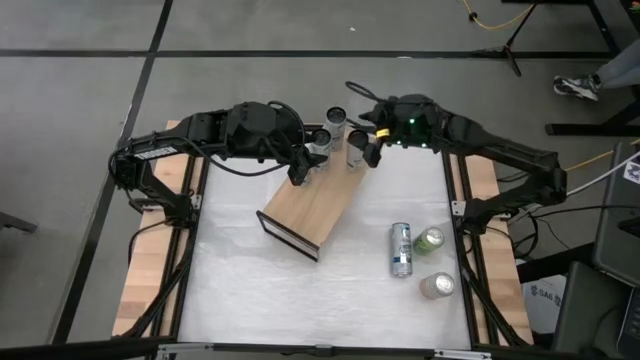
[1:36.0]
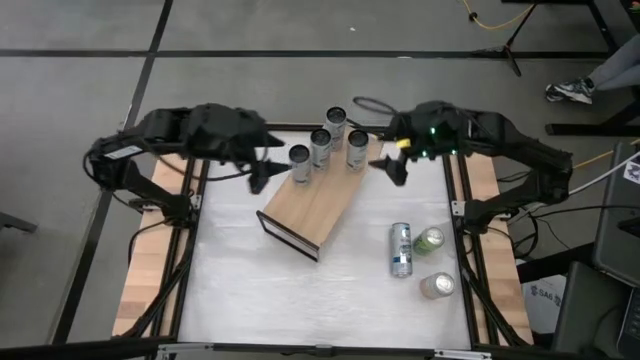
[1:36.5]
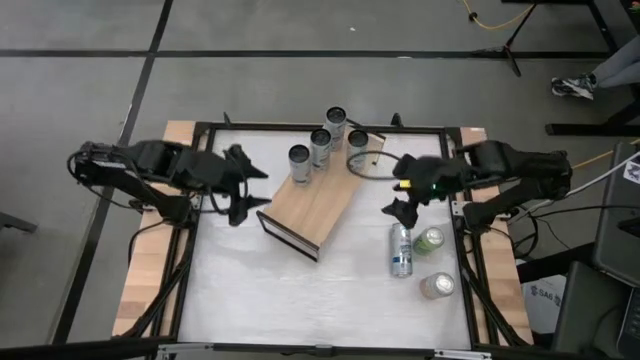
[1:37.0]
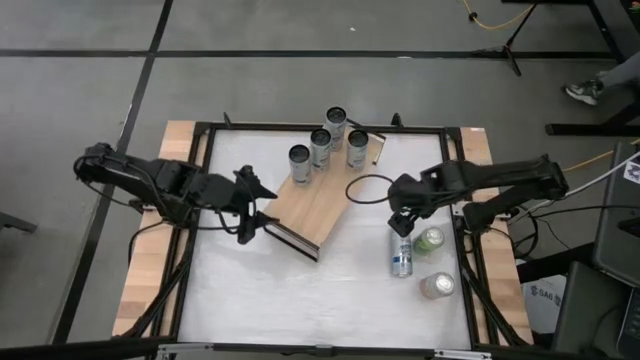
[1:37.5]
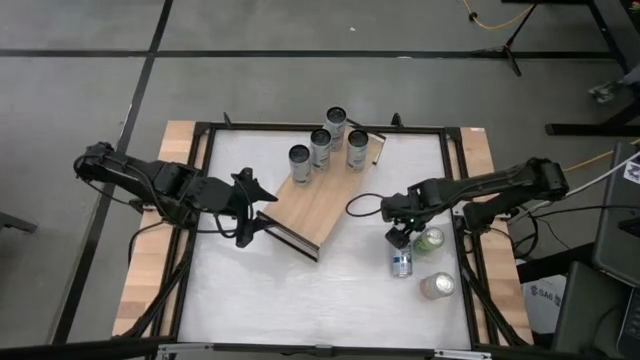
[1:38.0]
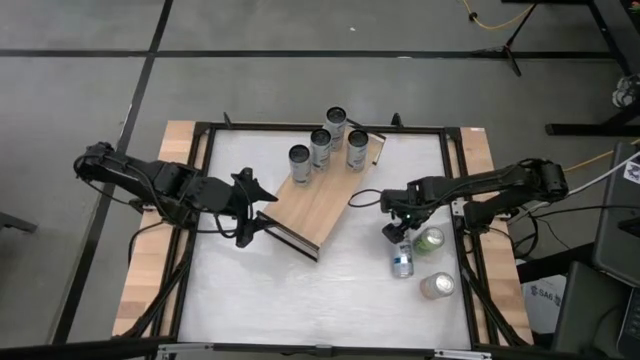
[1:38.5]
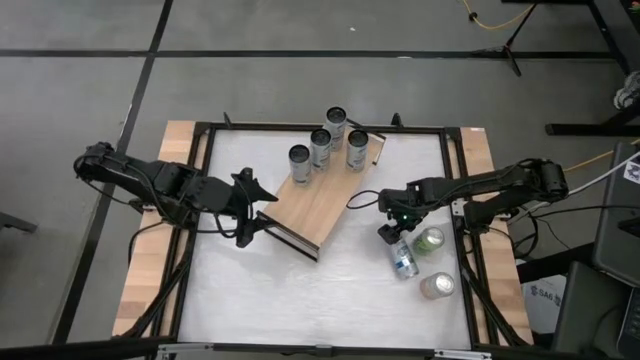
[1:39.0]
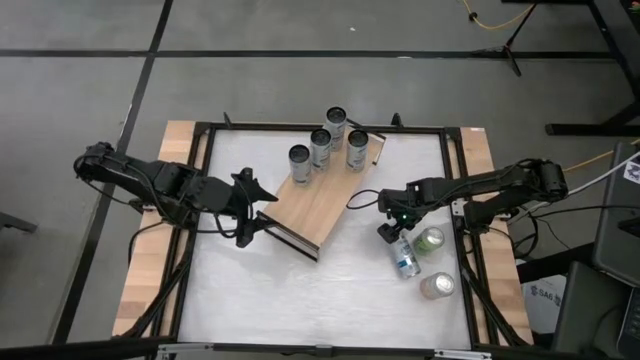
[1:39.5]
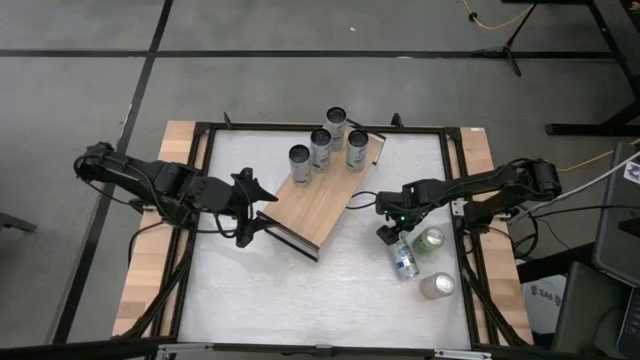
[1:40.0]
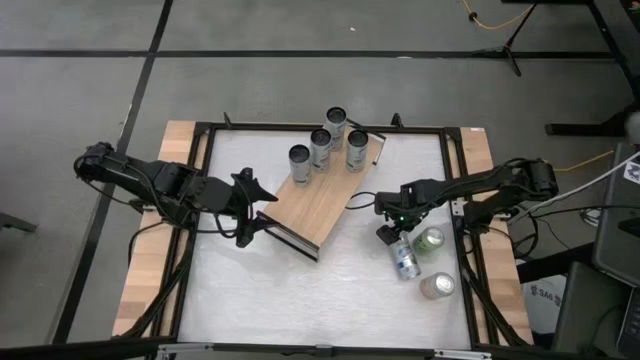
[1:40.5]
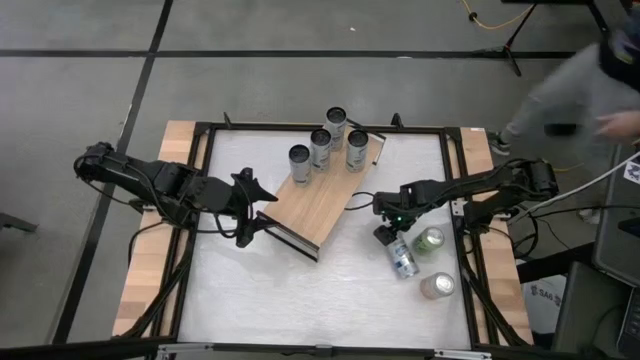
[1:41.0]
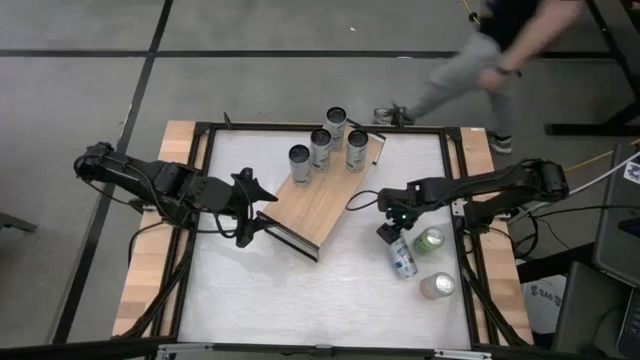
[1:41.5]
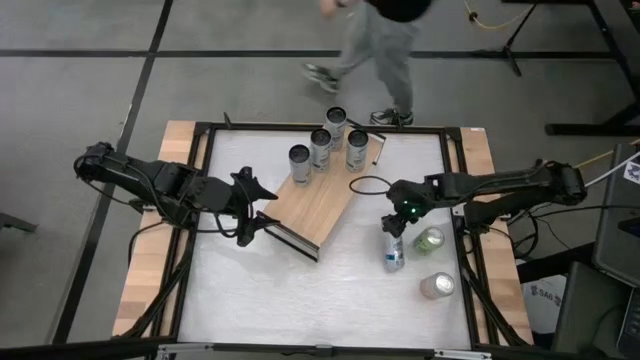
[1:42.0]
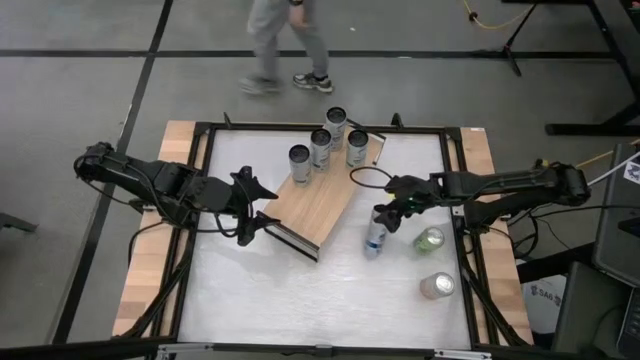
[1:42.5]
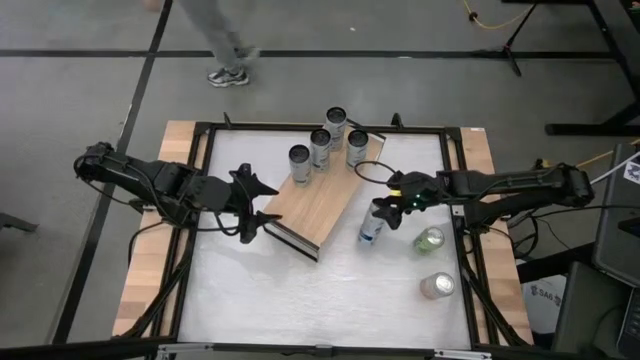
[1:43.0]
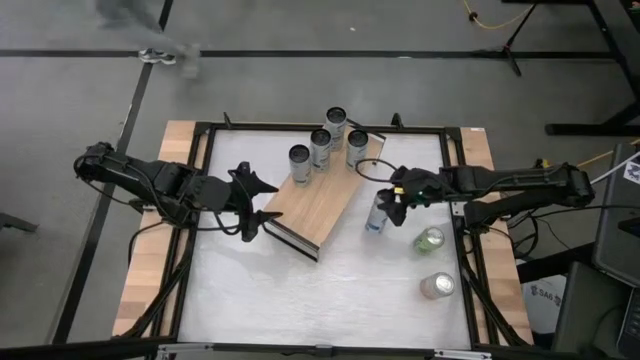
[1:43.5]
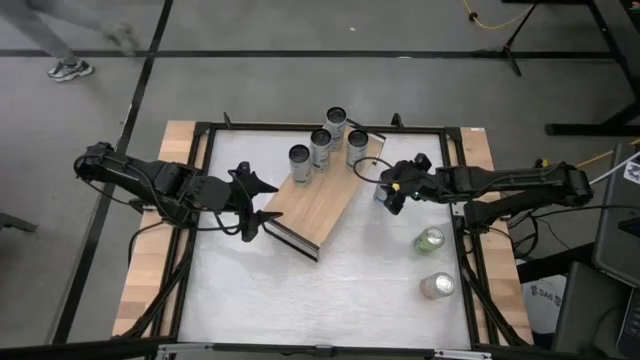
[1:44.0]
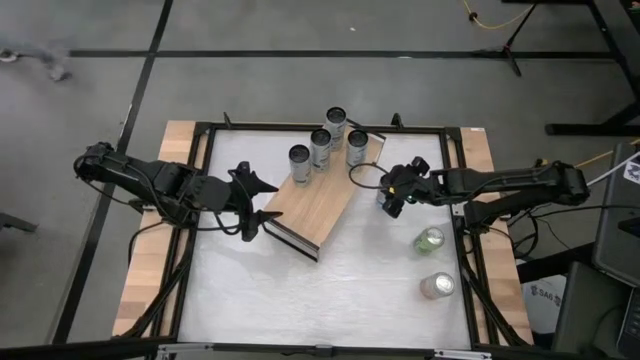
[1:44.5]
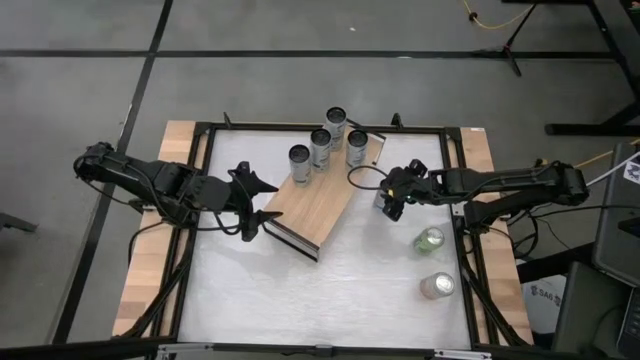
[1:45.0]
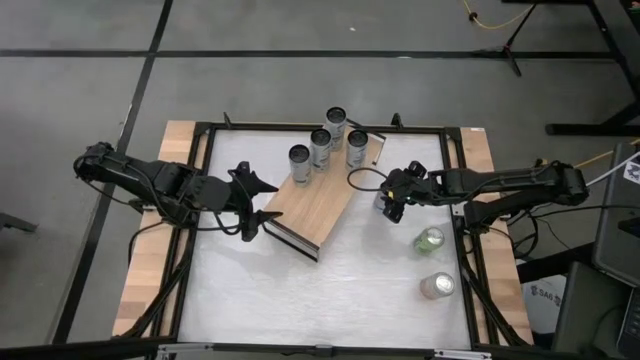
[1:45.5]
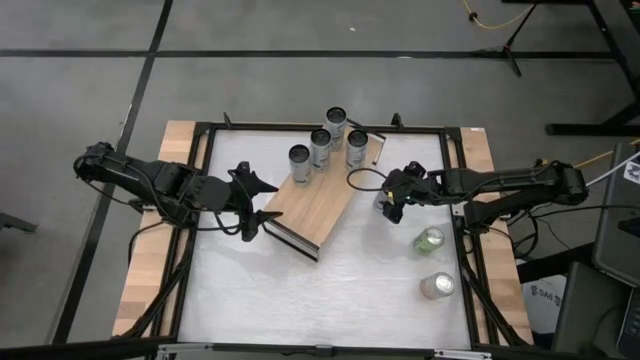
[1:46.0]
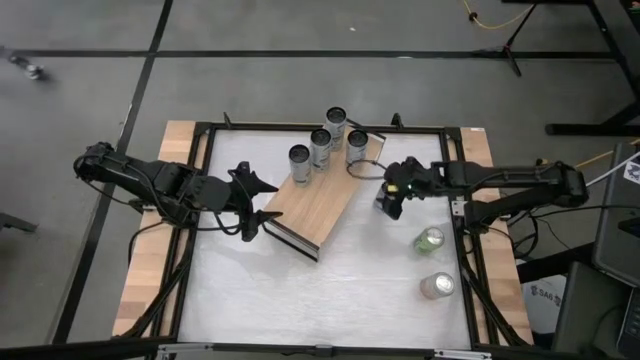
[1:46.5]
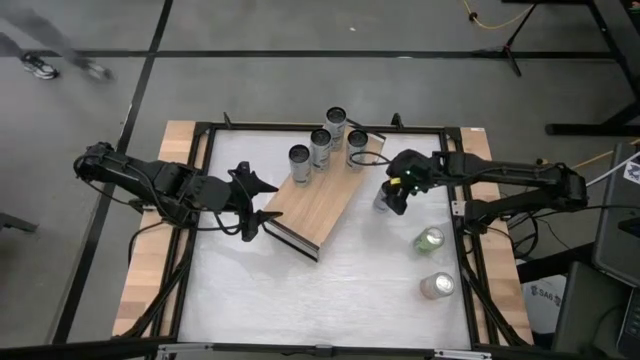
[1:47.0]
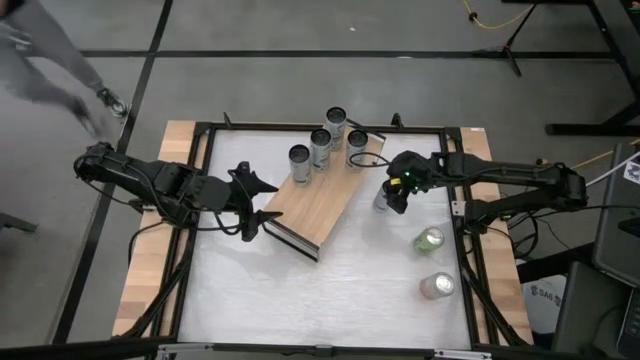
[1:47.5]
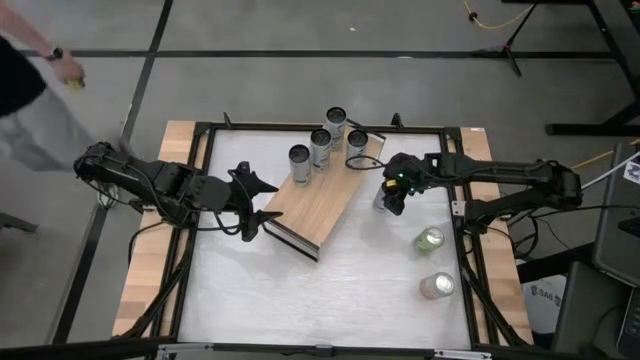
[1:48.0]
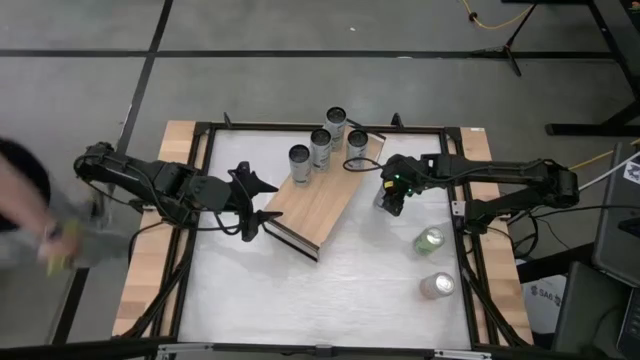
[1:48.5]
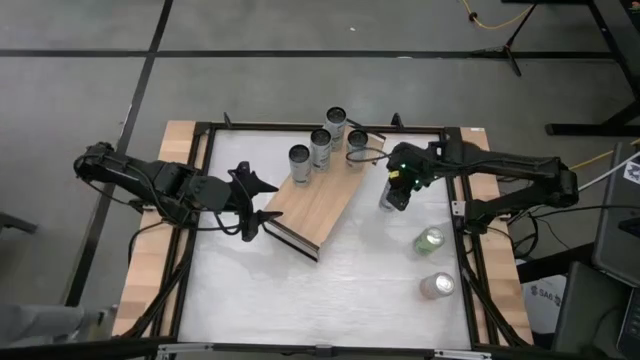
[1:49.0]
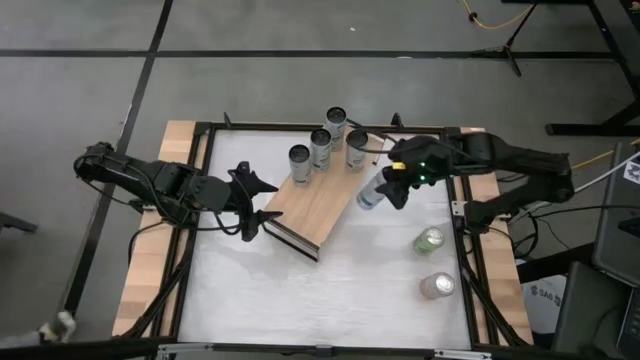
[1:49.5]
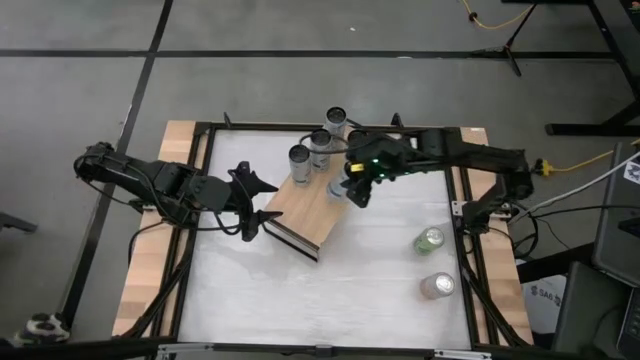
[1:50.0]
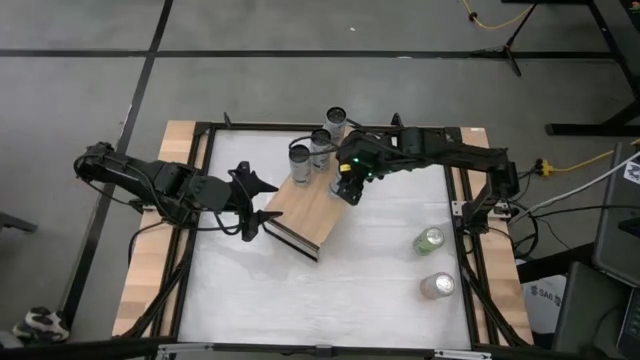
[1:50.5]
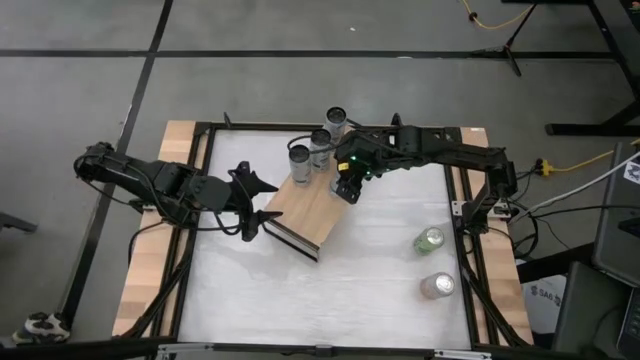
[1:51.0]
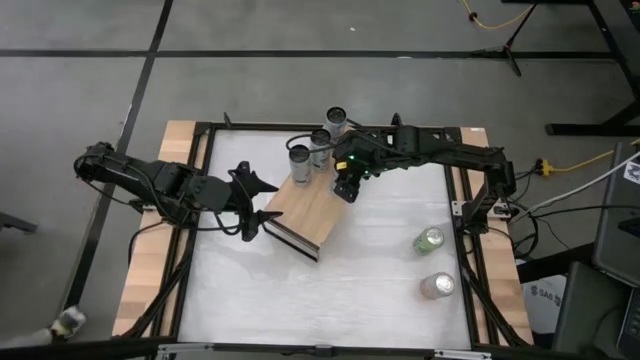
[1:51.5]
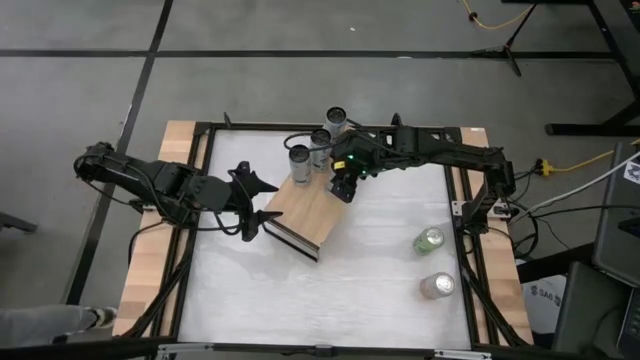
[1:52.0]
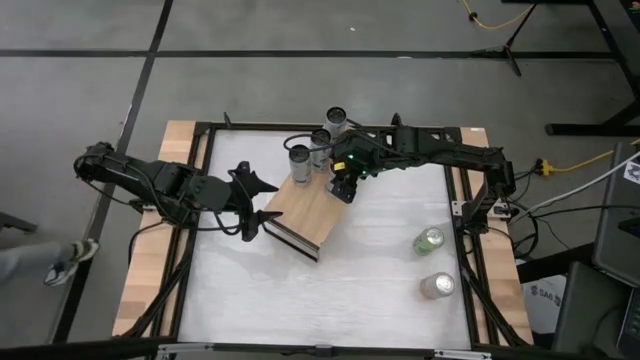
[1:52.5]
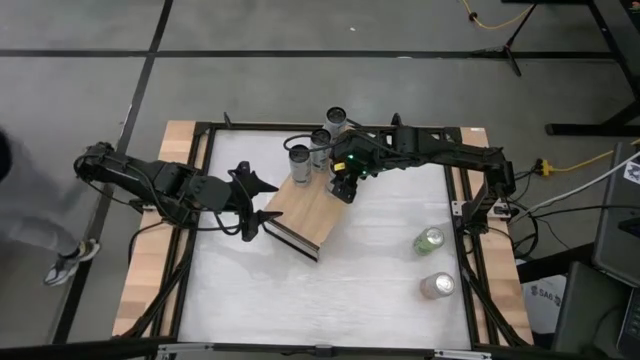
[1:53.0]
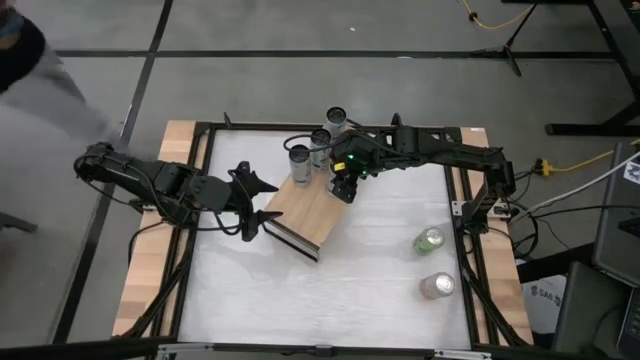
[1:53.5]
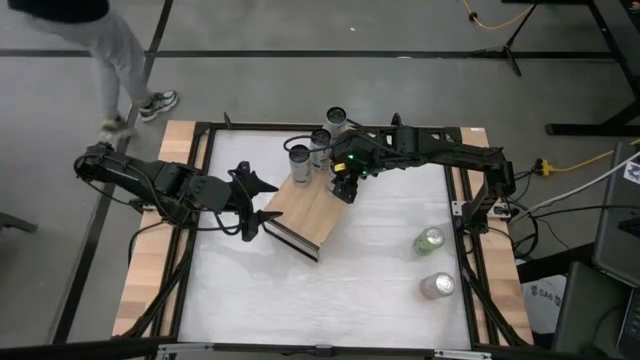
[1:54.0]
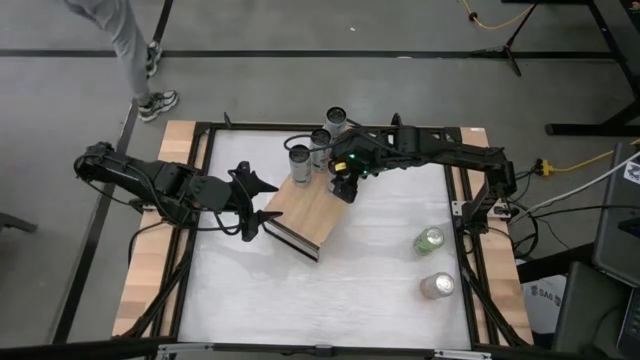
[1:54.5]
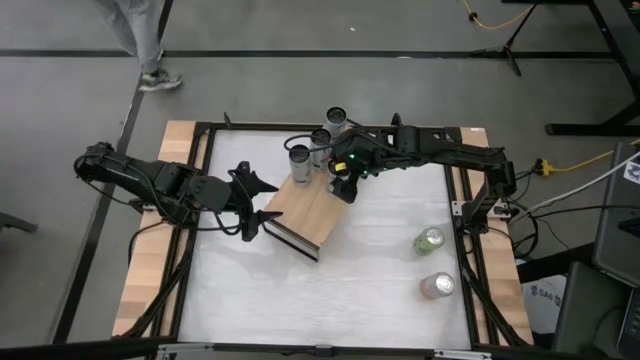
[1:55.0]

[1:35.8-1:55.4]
Task: Place canned beverage on shelf
Put the white soda can on the shelf
